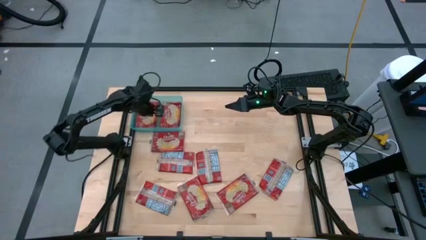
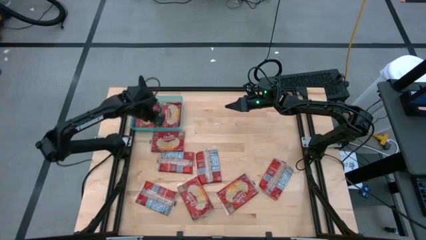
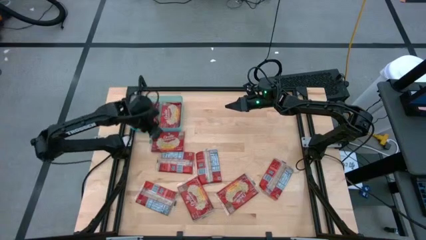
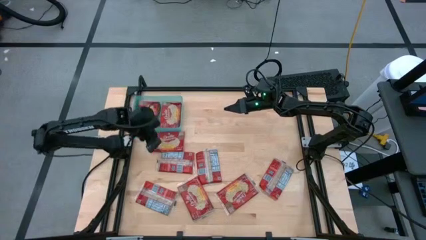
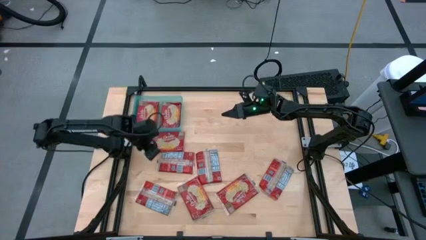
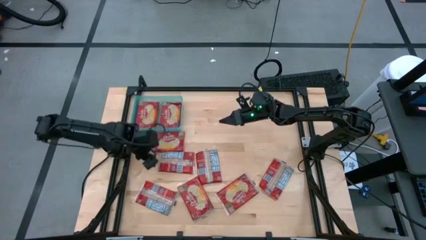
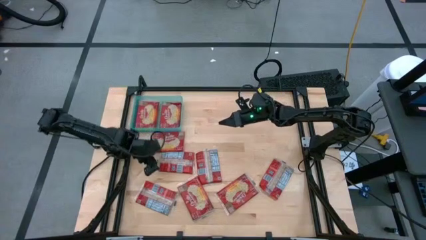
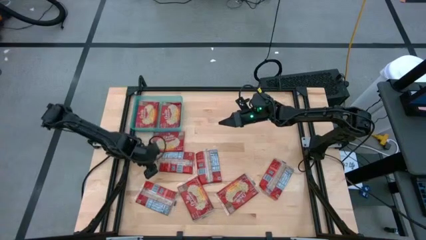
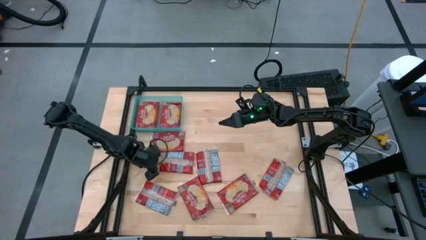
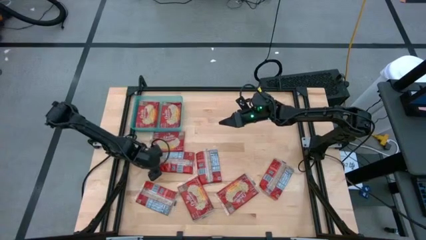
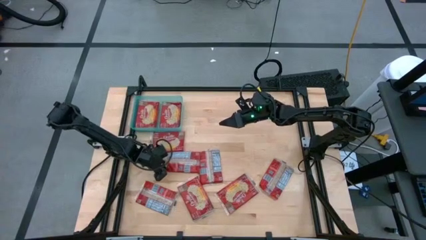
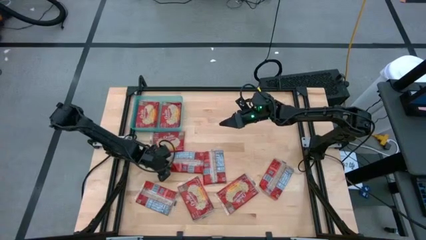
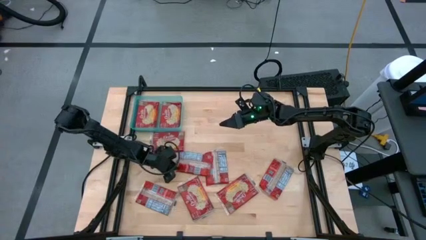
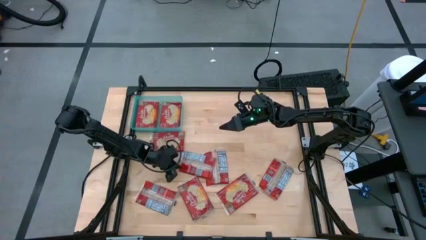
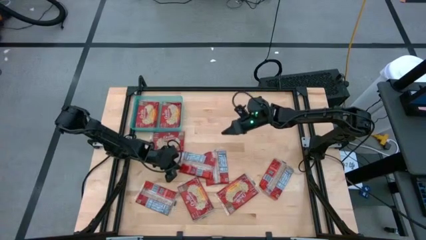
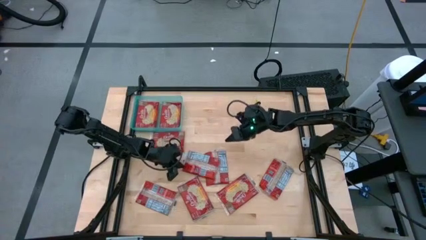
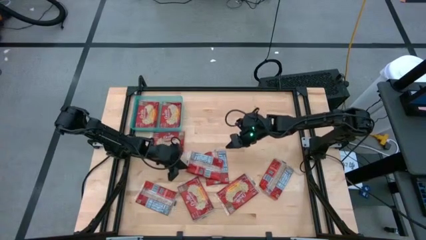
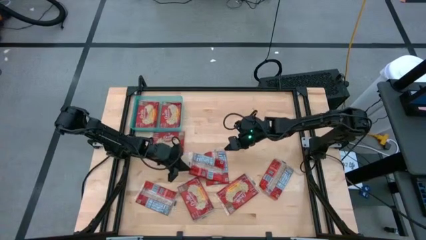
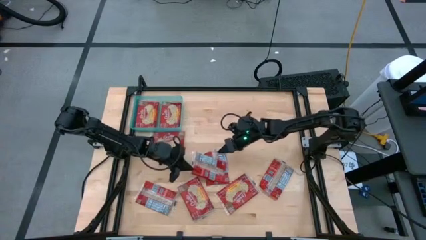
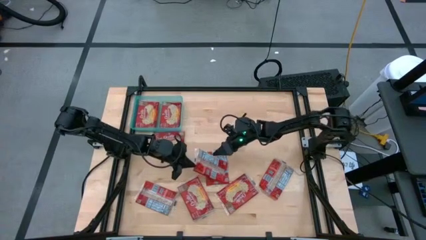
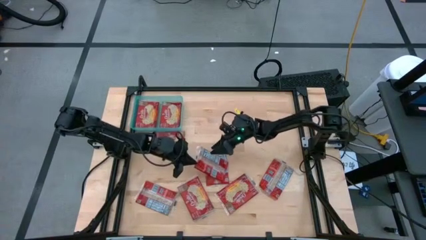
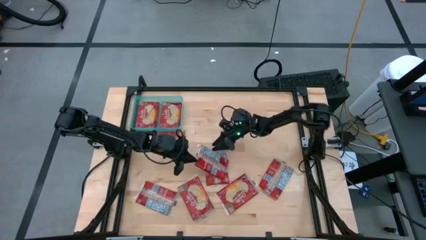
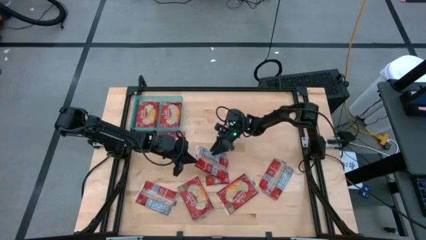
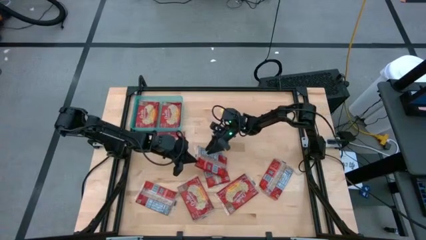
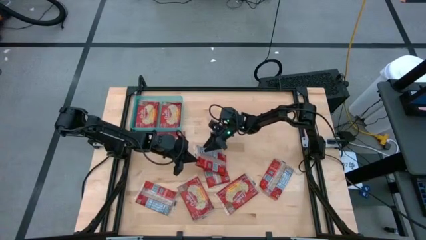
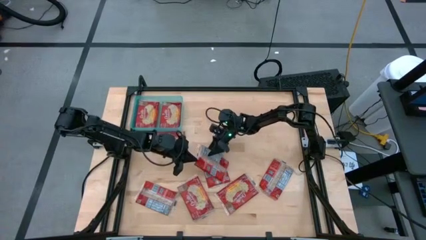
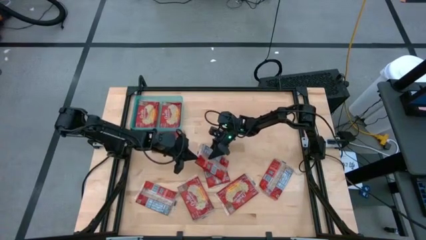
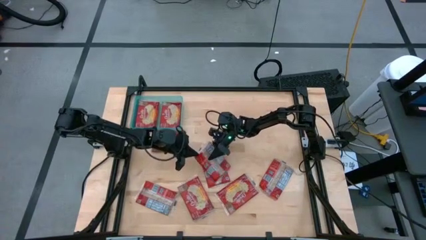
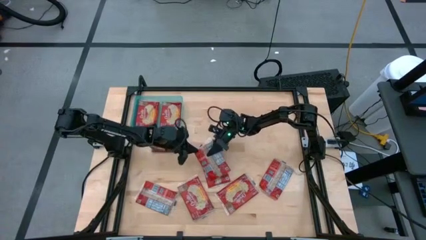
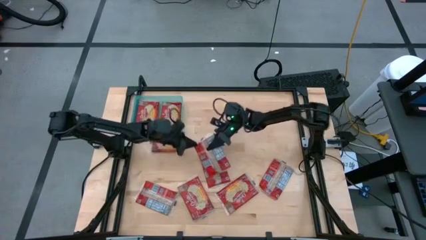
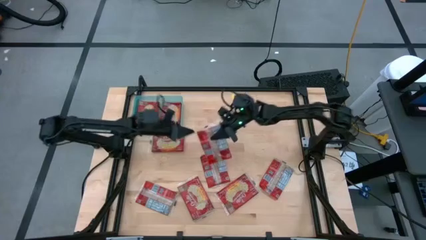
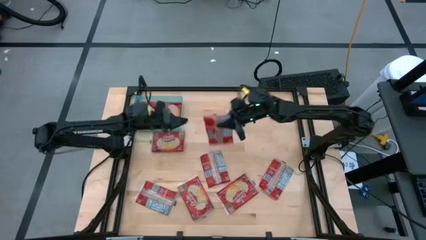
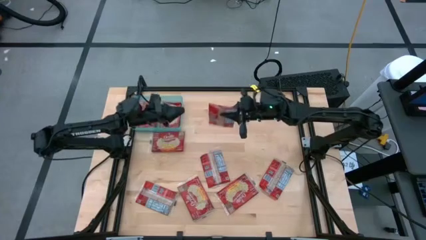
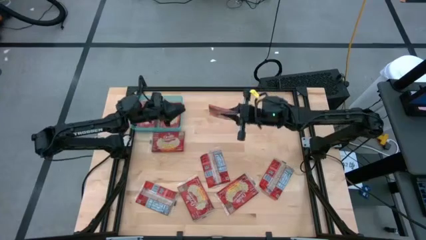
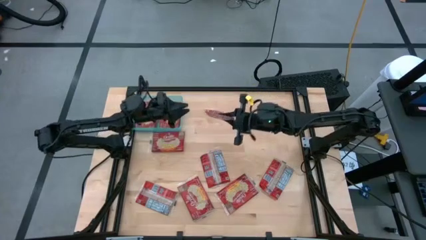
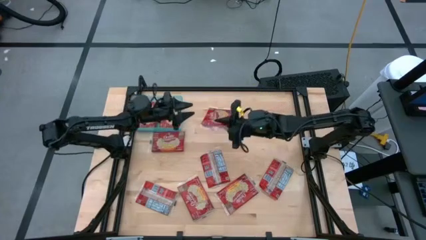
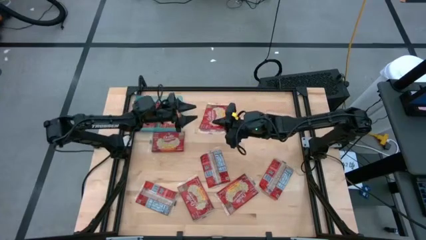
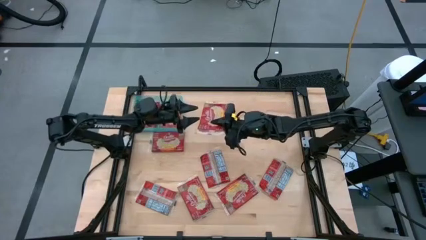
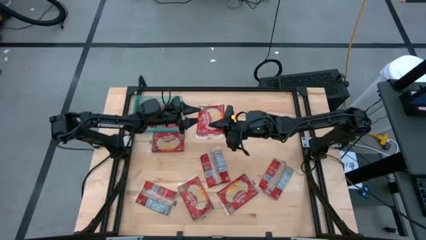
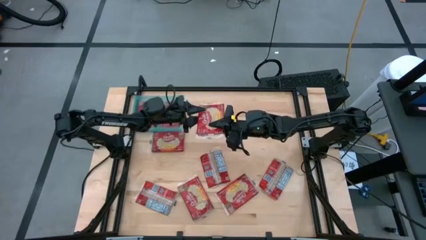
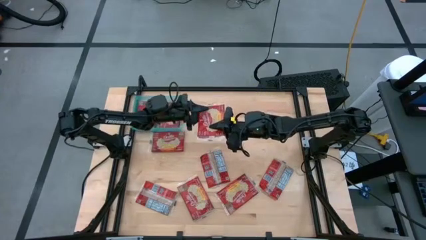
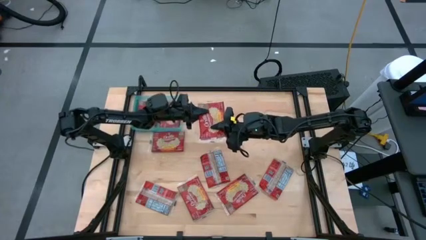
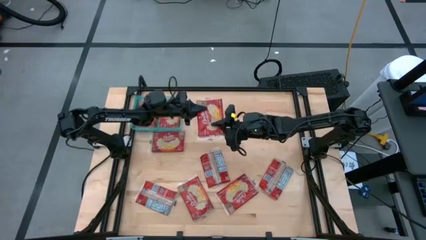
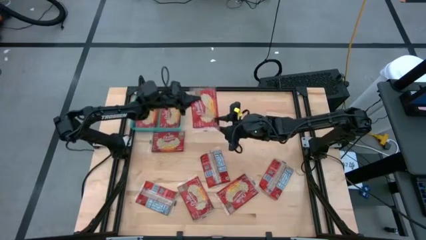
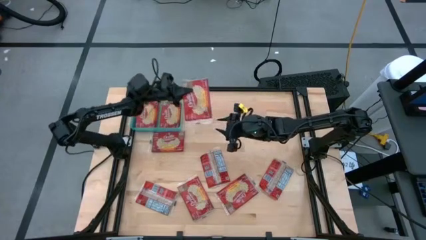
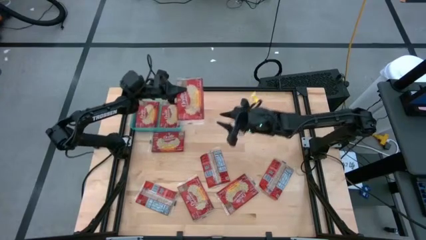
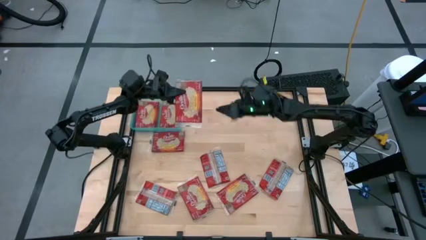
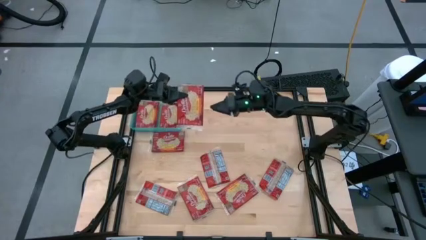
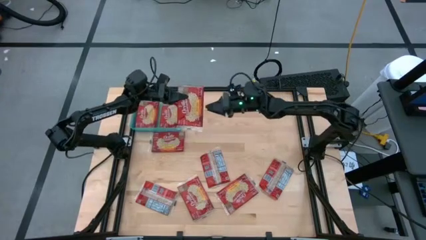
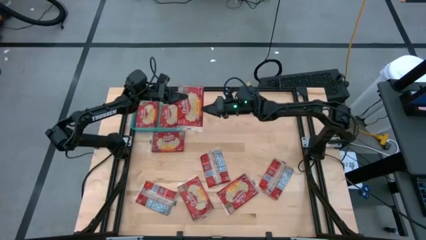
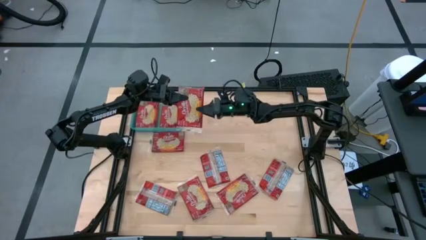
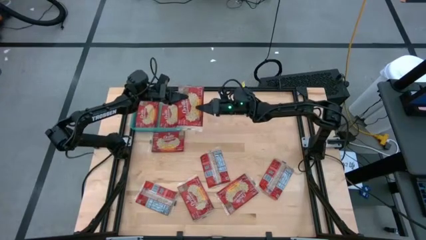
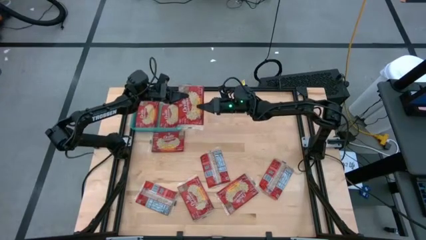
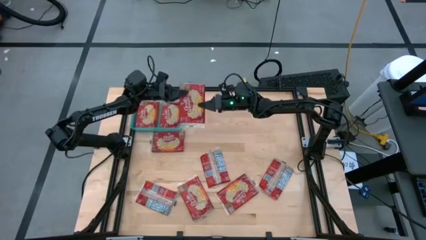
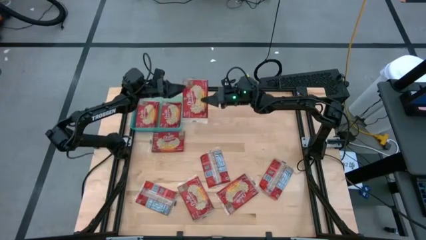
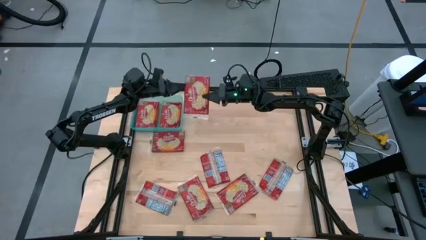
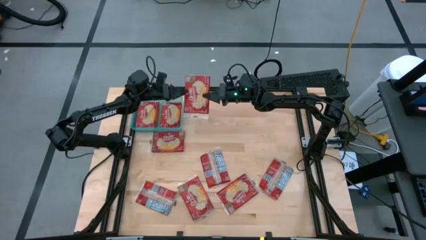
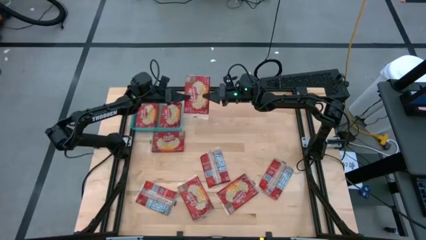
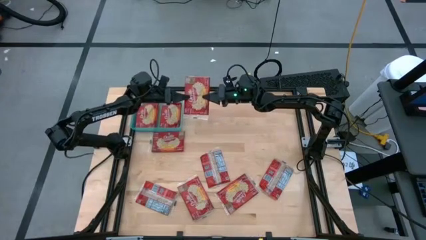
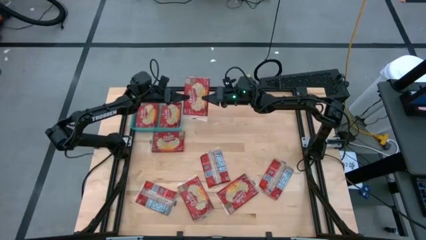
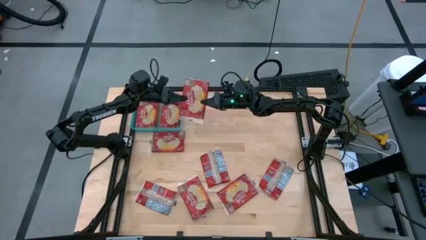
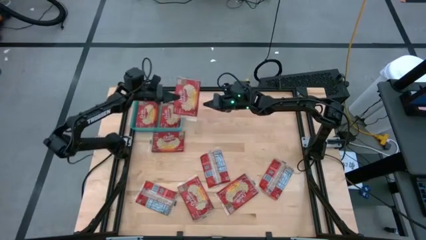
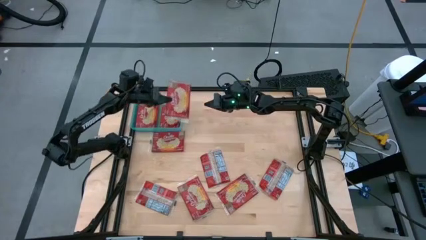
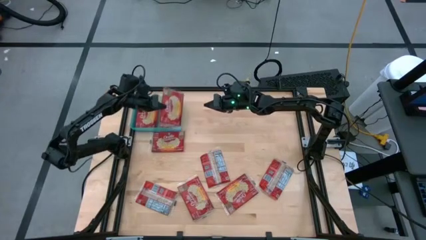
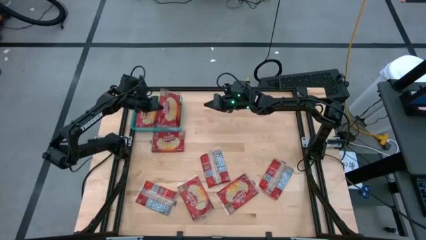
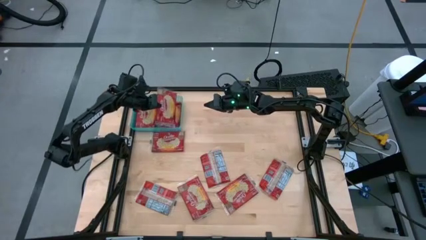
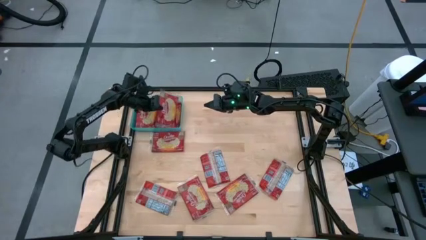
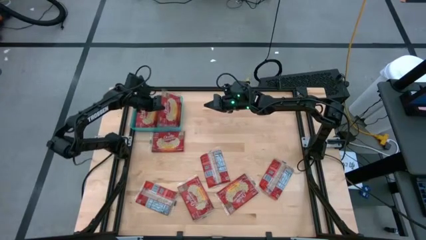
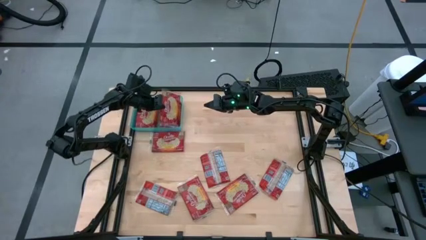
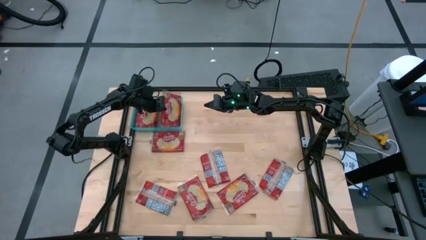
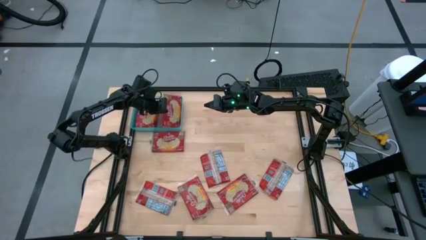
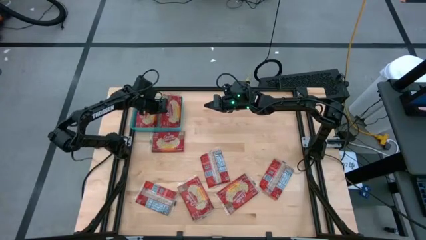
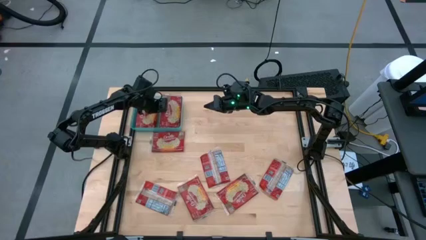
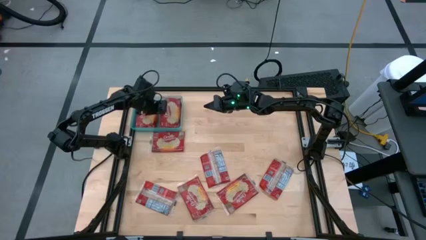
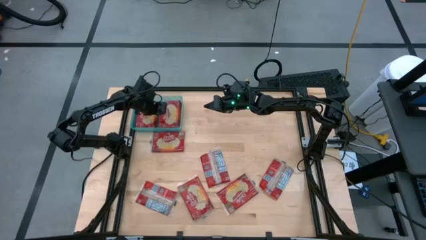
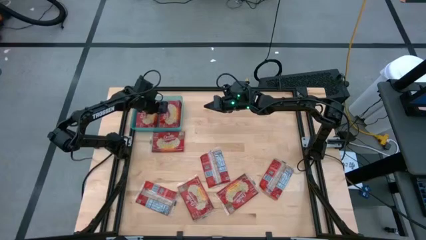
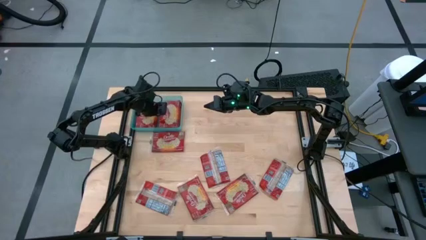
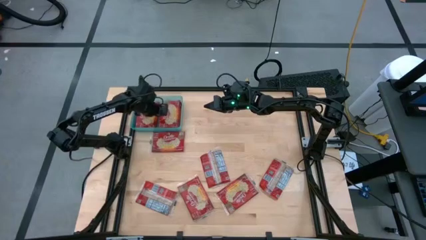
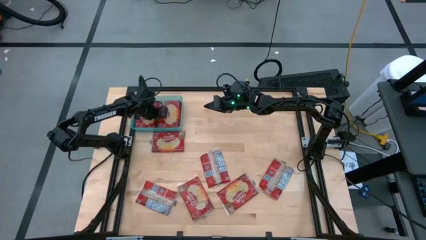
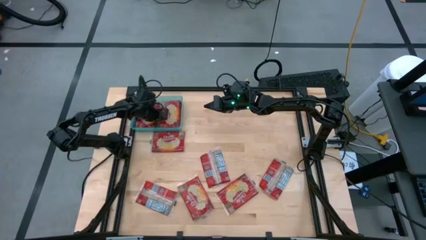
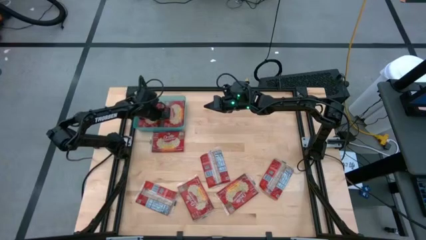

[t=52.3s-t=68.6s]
Task: Sort popcorn bags into baskets
Put the red popcorn bag into the blue bin

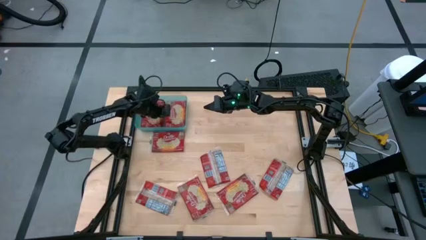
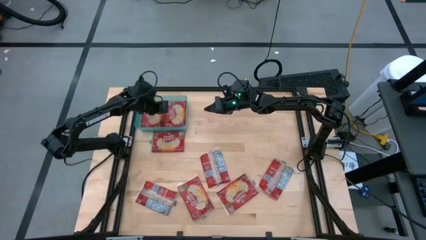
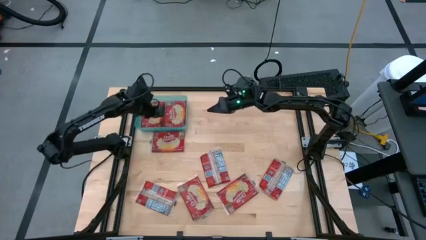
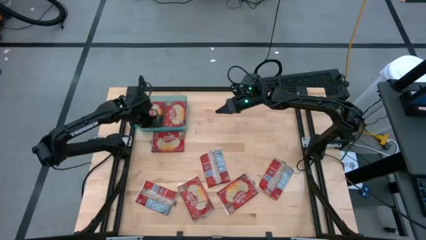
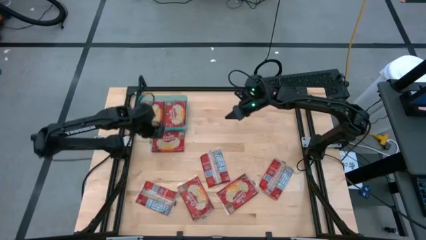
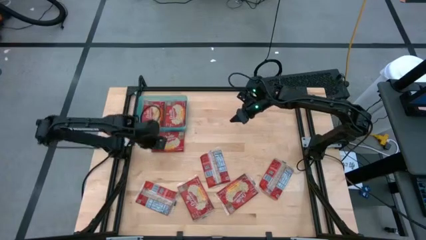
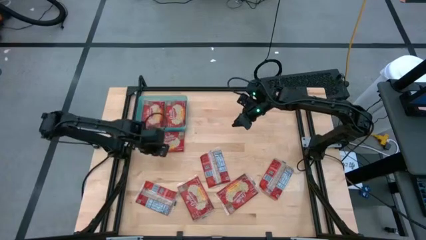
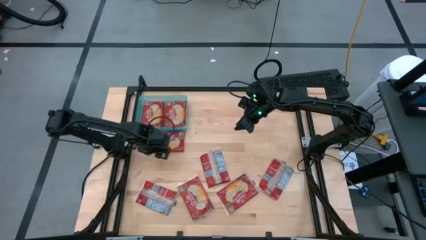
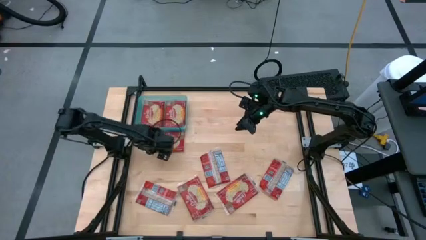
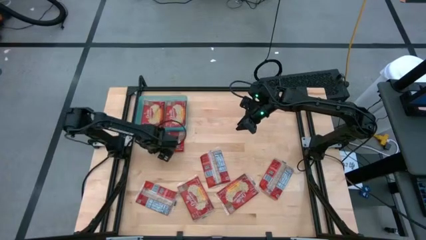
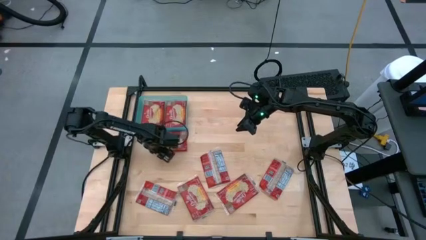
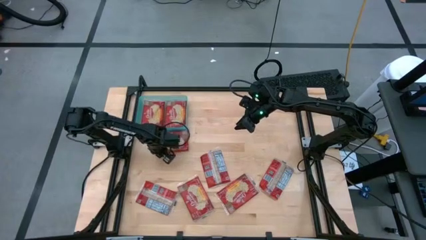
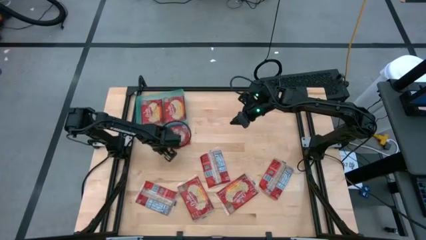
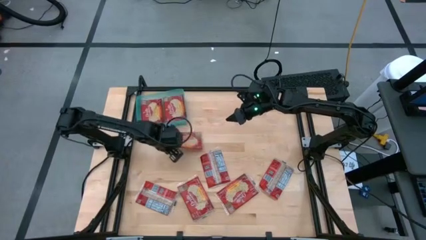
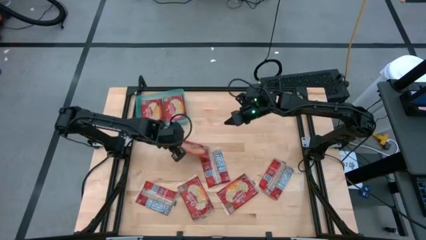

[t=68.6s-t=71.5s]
Put the red popcorn bag into the blue bin
